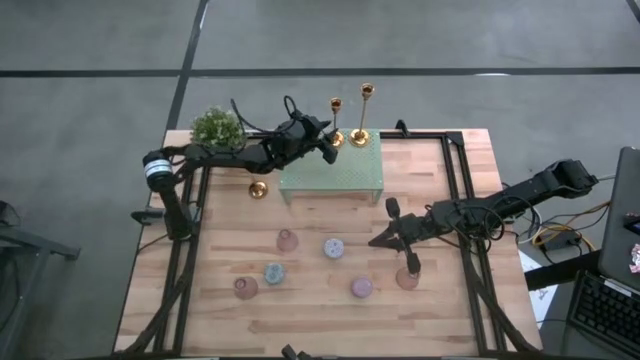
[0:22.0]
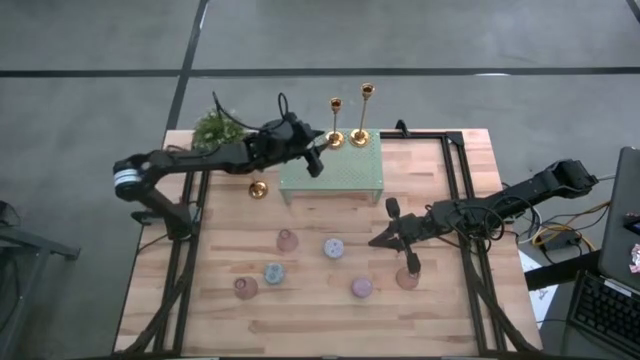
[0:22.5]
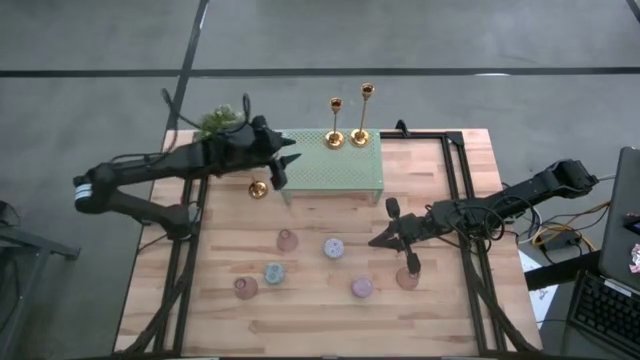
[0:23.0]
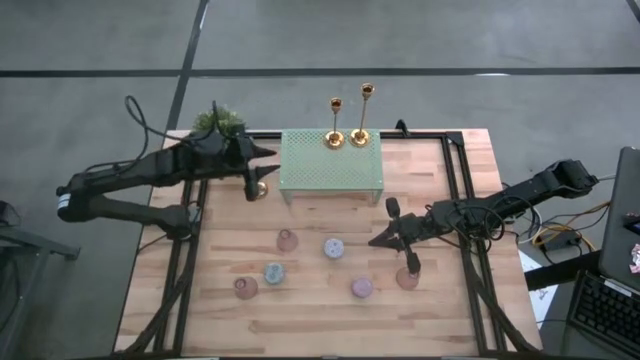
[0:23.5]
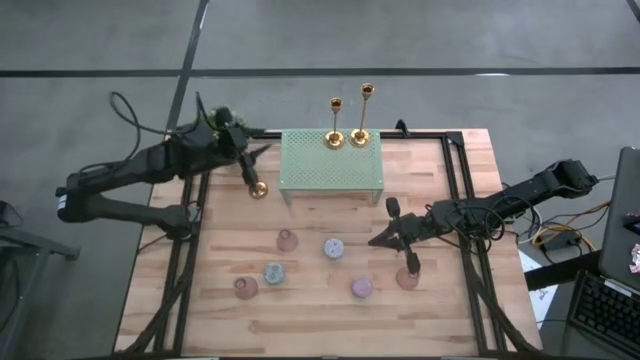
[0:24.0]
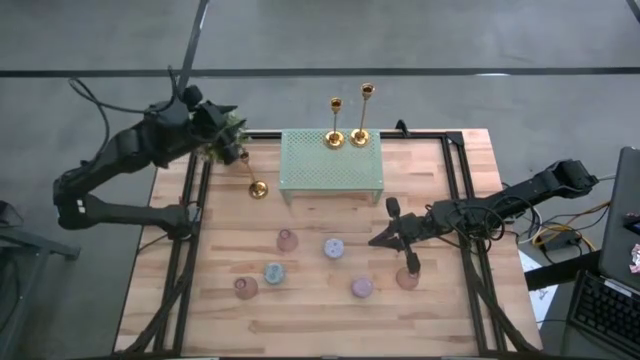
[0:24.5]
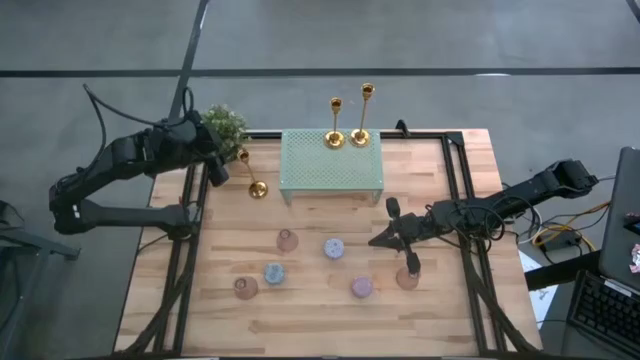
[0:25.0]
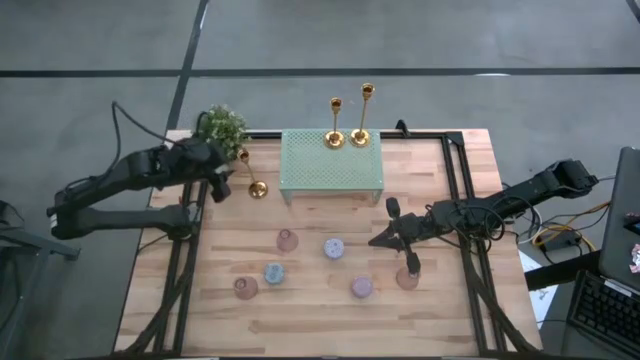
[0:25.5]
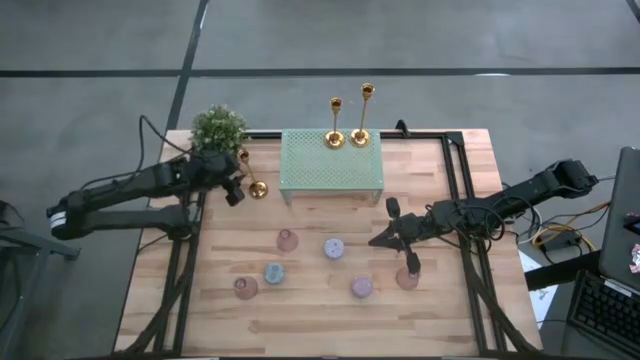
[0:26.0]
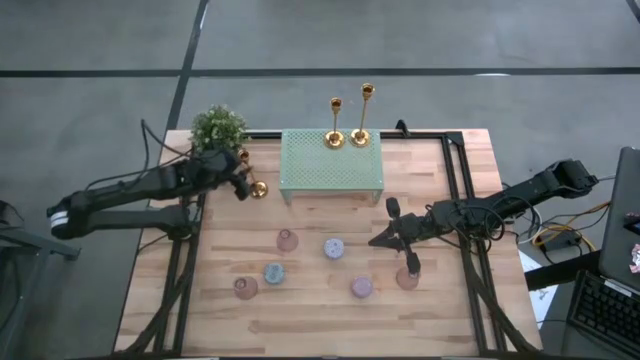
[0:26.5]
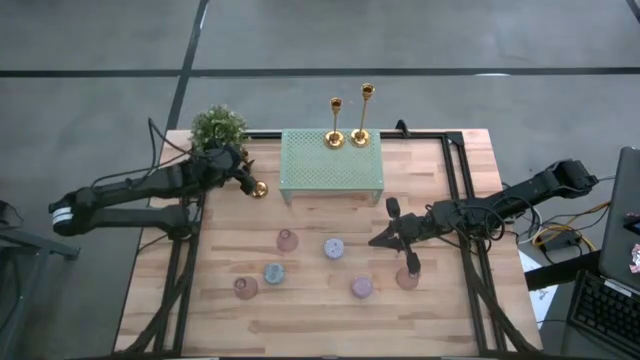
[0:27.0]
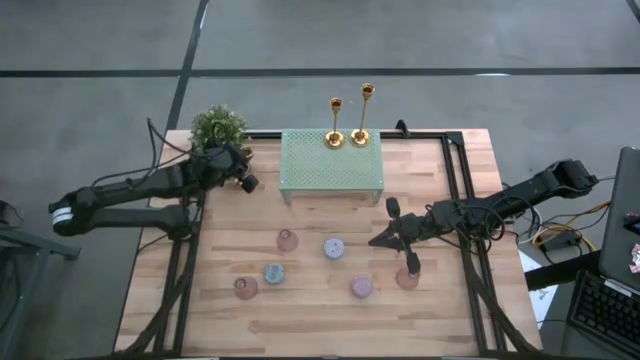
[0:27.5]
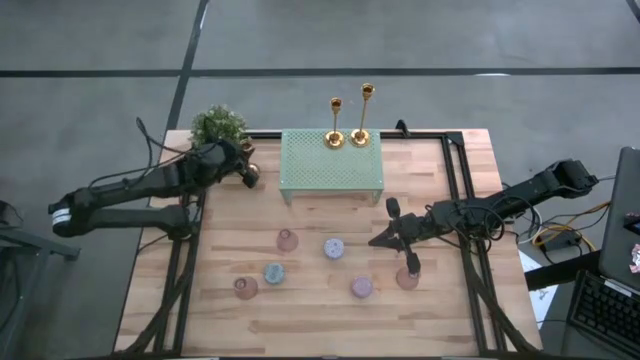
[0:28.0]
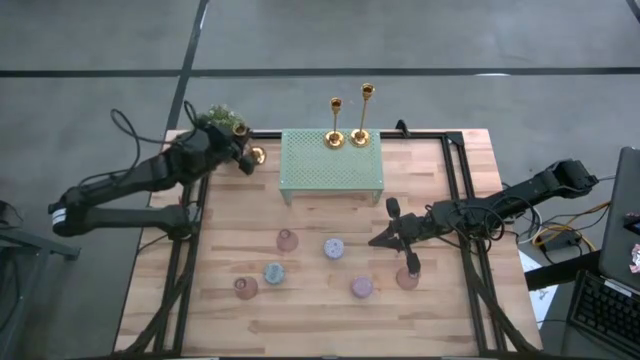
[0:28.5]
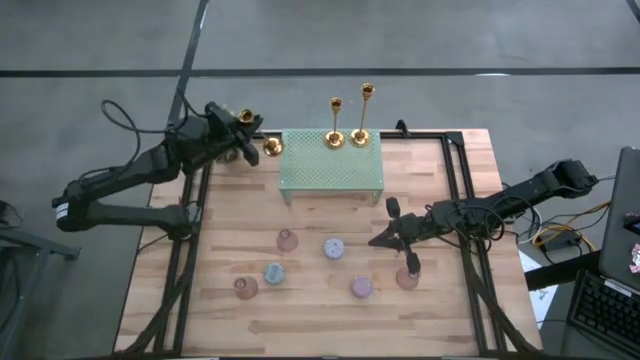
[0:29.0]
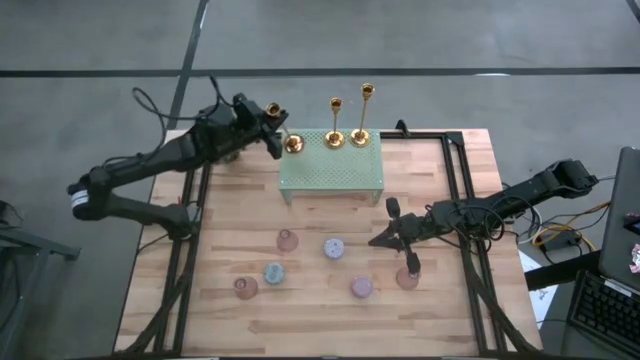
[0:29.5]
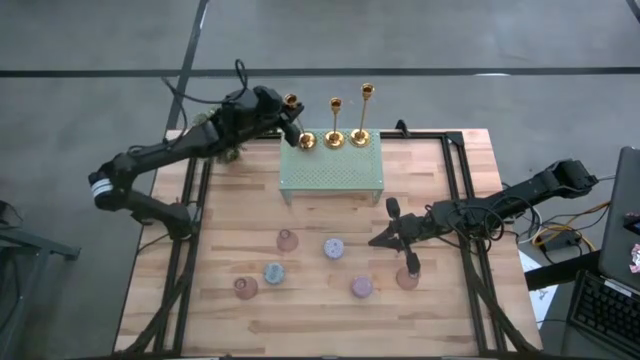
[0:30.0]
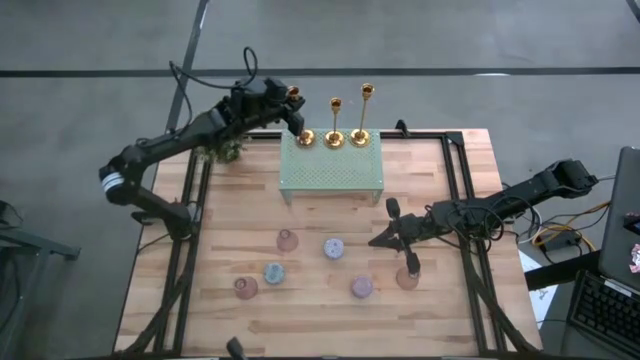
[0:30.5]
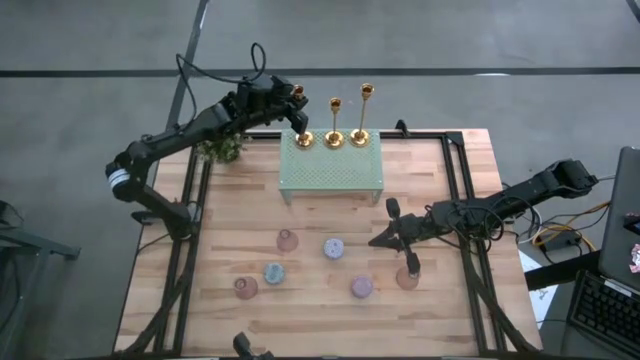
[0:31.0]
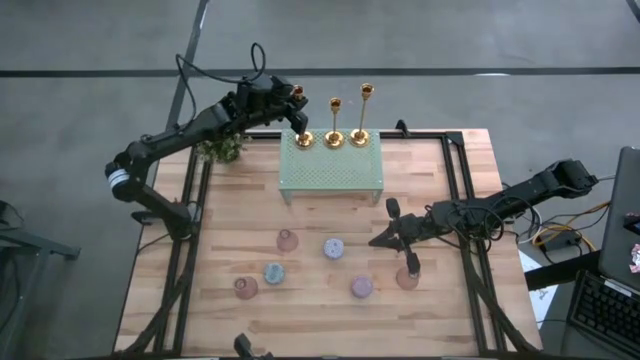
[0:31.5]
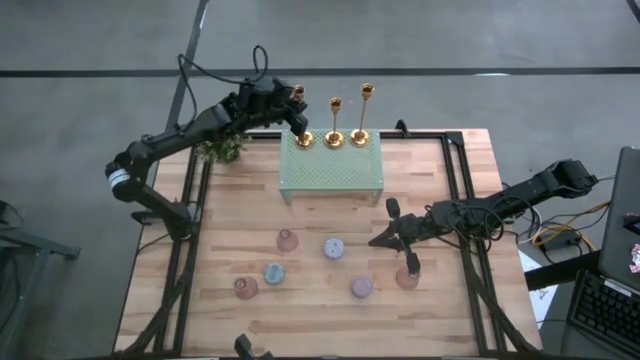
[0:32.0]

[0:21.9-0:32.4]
Task: Stock candles and vases on shelf
Align the gold candle holder with the other gold candle holders on the shelf

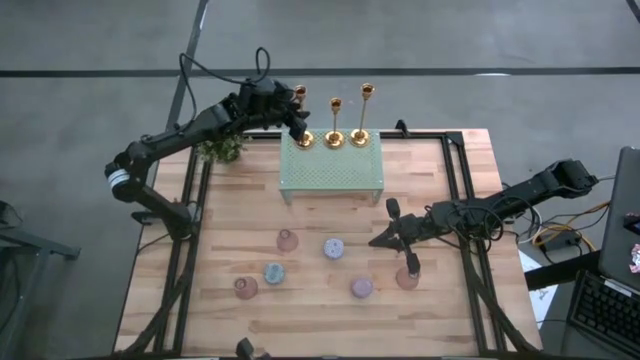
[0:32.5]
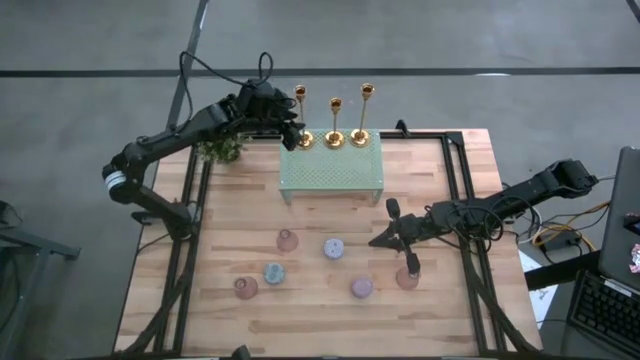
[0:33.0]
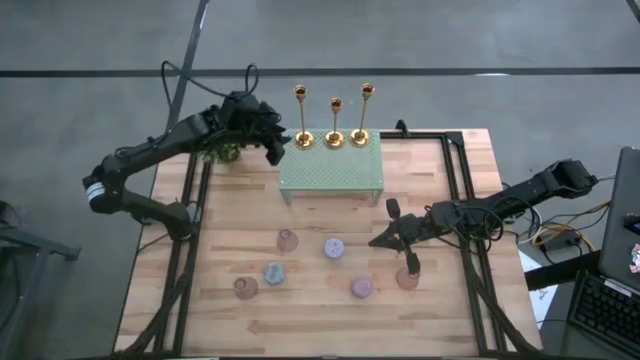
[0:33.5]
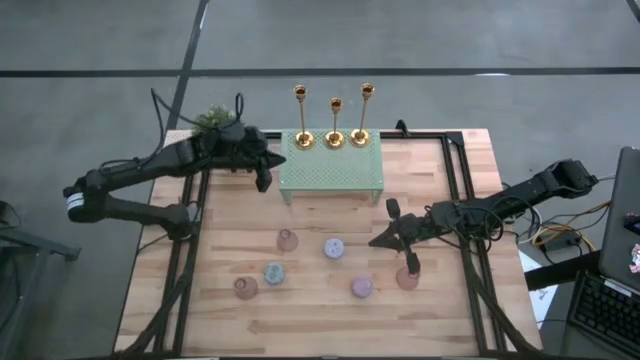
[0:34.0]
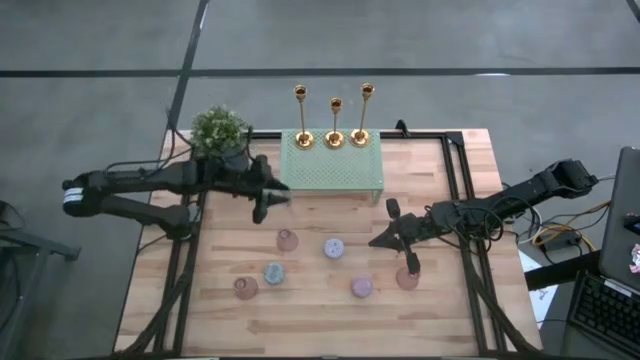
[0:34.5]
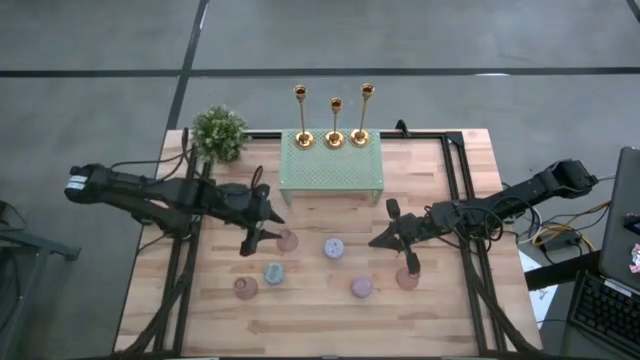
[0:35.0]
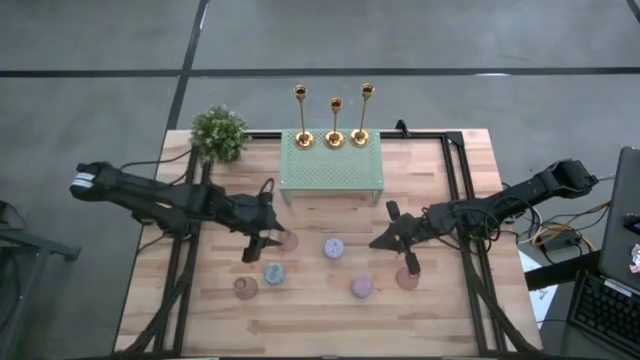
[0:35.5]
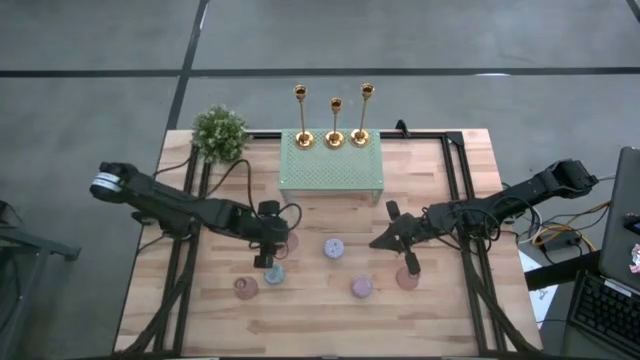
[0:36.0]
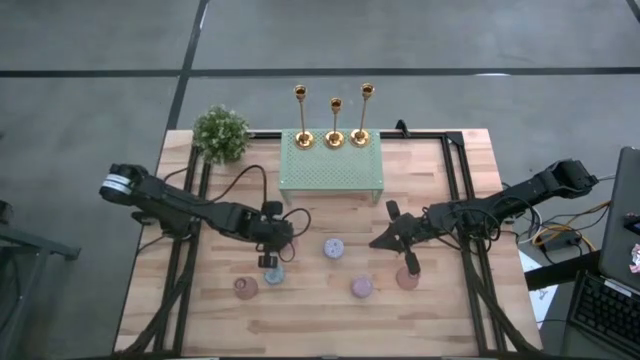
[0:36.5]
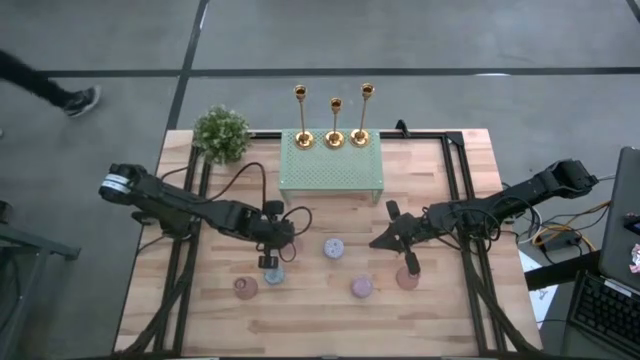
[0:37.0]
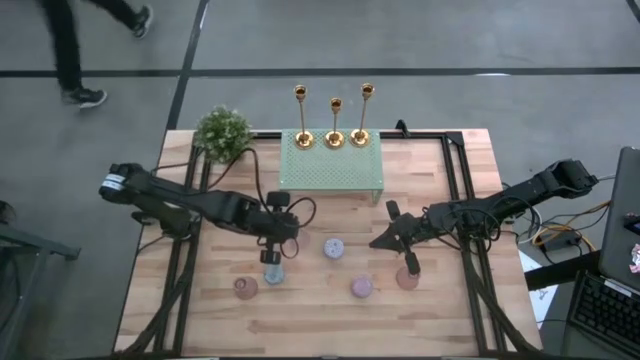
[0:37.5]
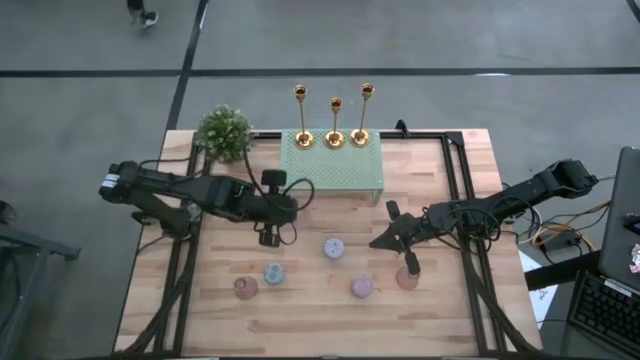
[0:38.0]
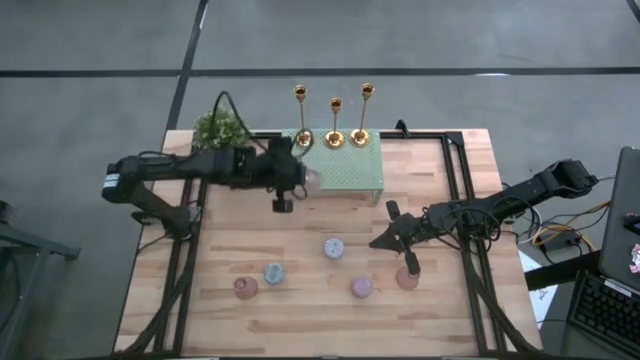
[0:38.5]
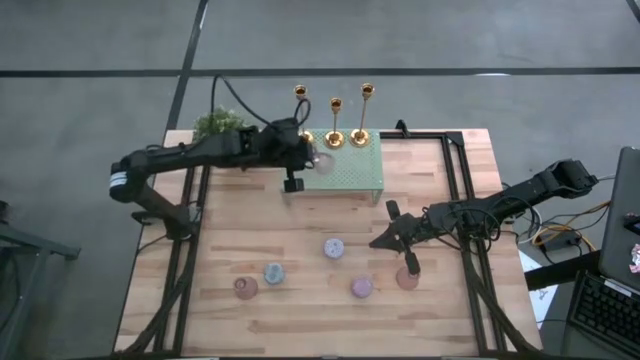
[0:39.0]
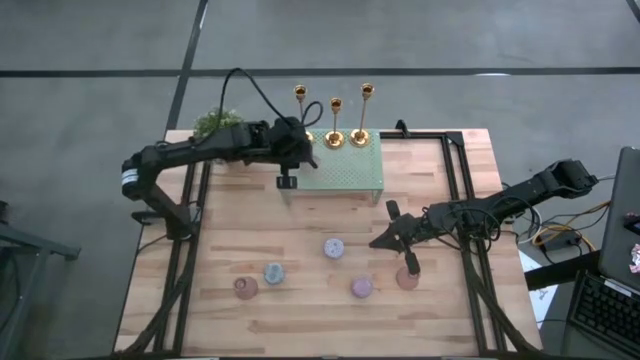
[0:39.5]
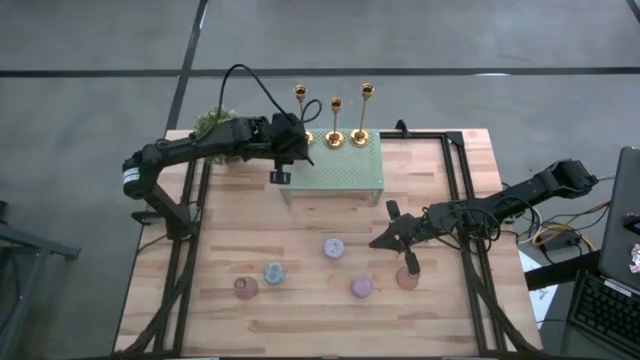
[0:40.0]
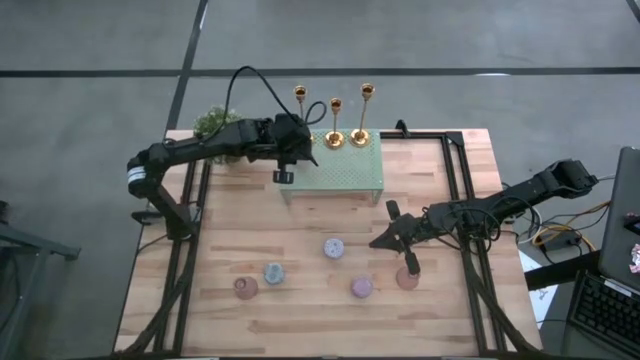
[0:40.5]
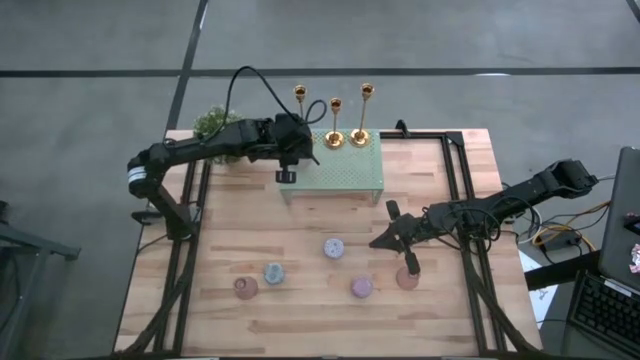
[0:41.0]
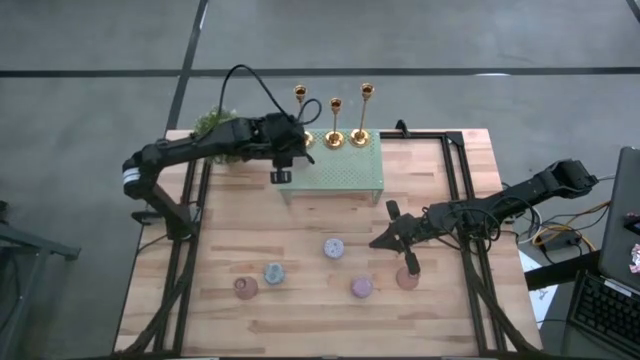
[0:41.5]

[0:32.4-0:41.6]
Put the top pink vase on the shelf
